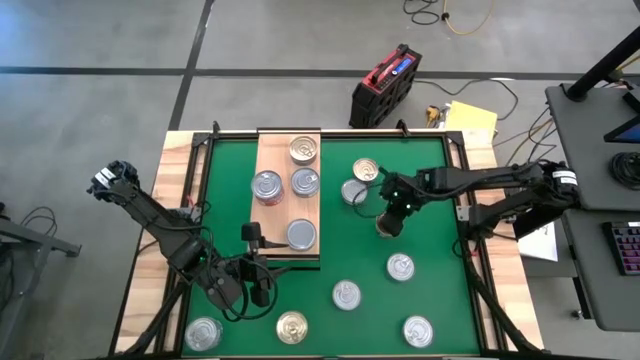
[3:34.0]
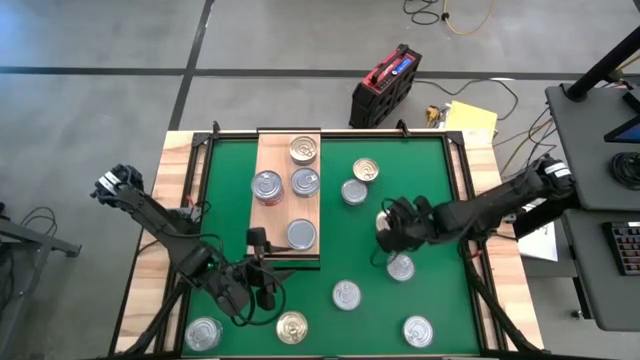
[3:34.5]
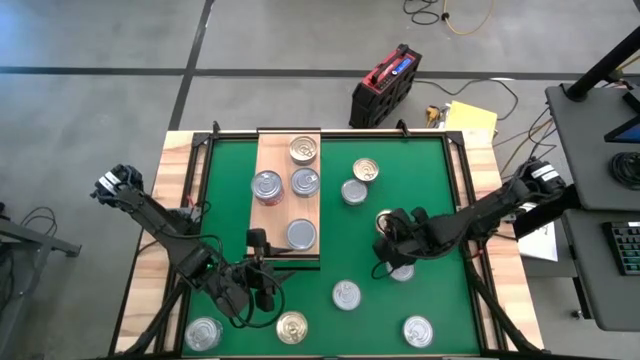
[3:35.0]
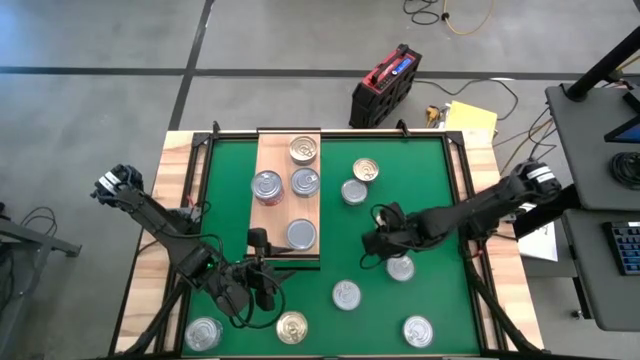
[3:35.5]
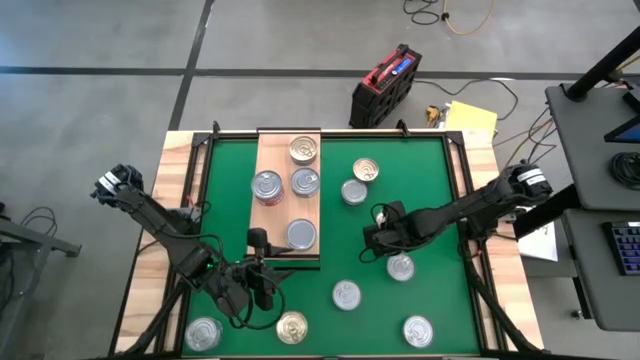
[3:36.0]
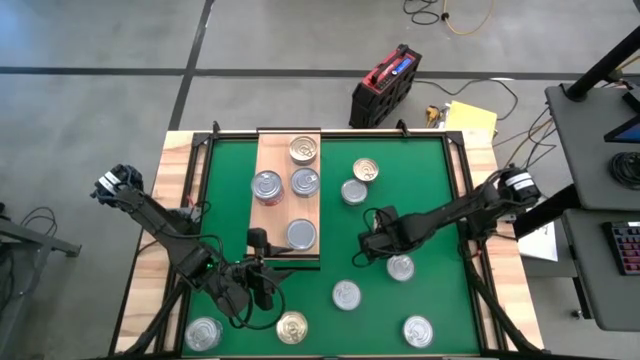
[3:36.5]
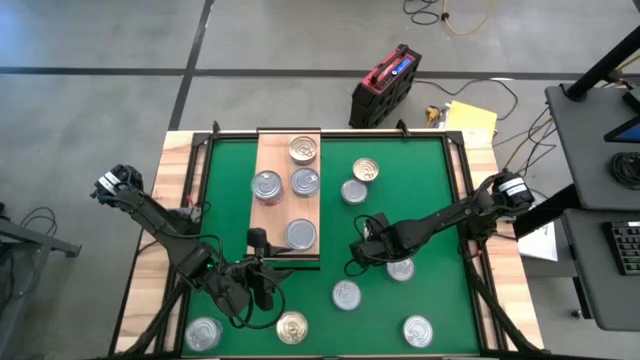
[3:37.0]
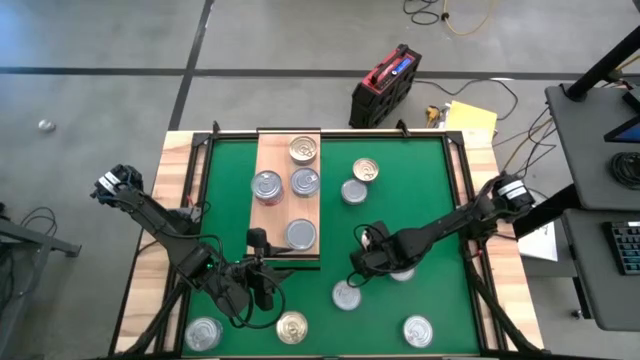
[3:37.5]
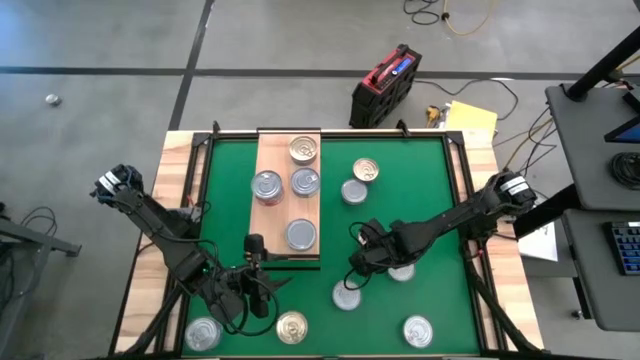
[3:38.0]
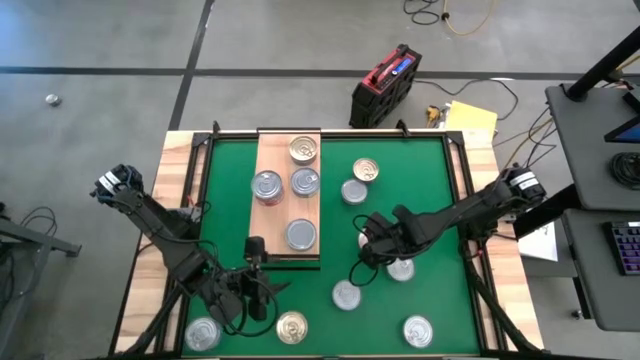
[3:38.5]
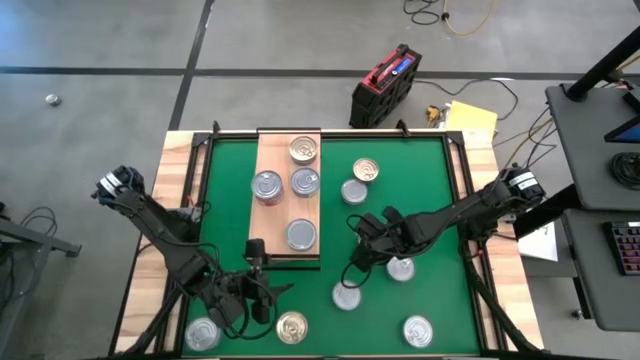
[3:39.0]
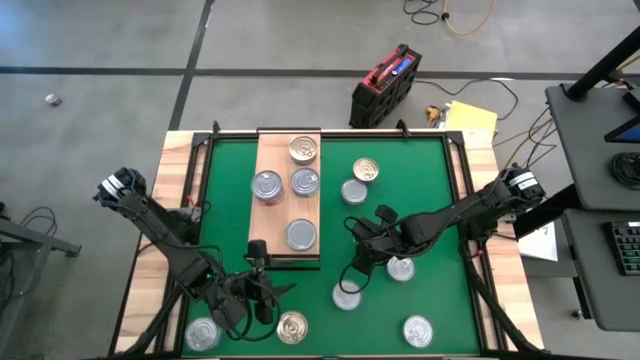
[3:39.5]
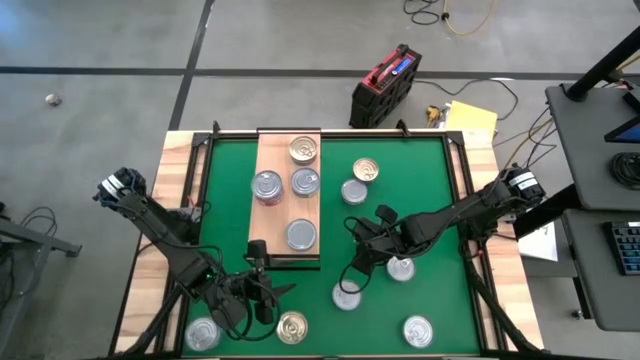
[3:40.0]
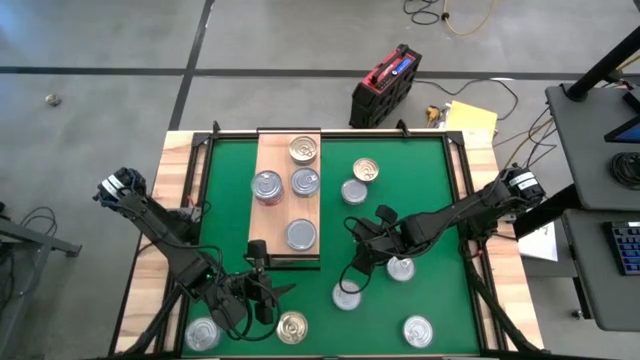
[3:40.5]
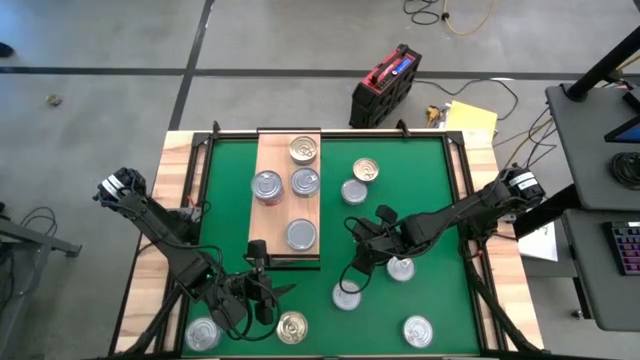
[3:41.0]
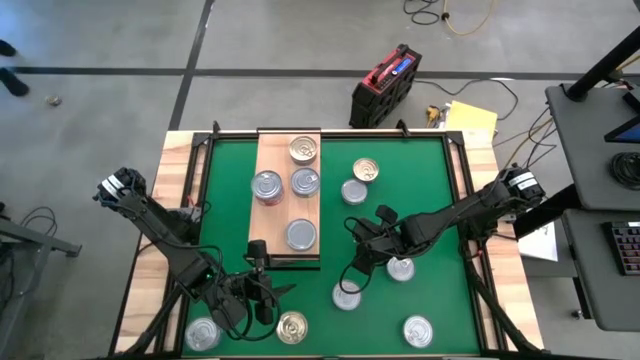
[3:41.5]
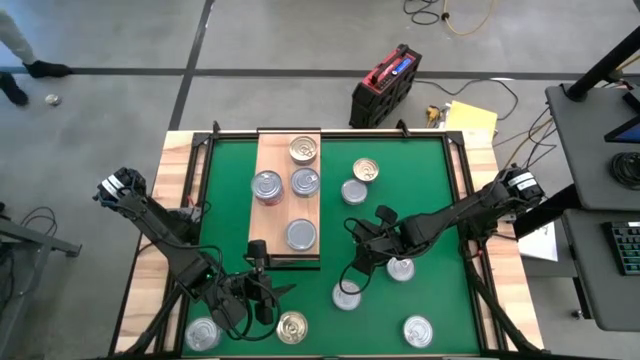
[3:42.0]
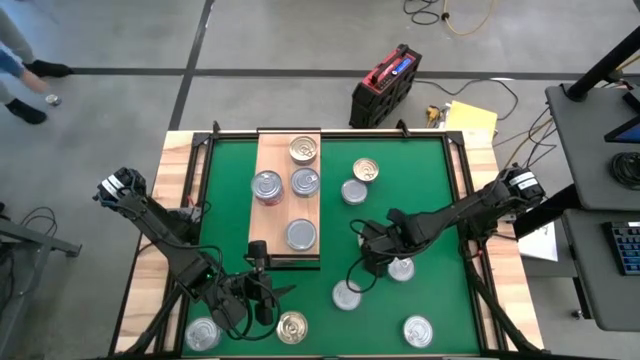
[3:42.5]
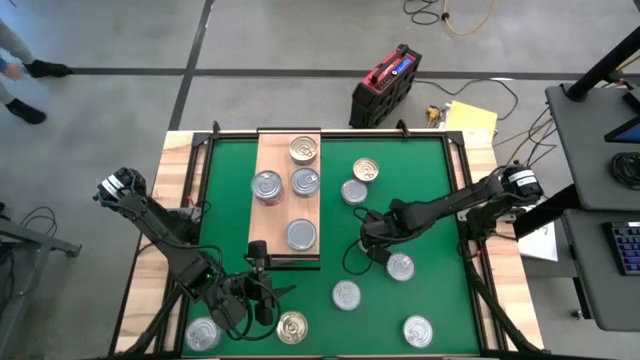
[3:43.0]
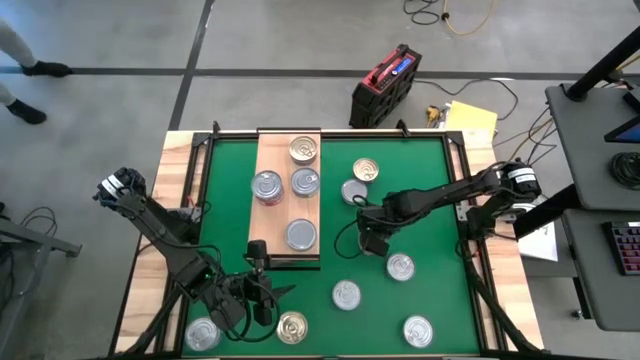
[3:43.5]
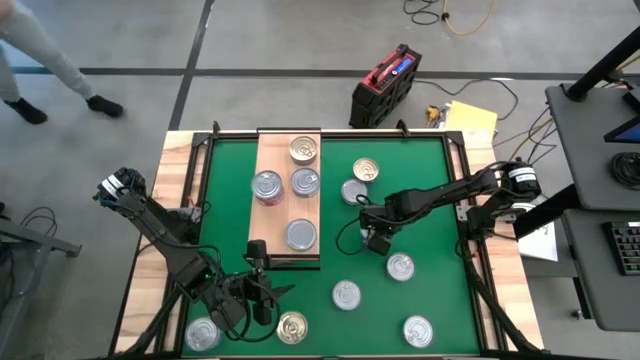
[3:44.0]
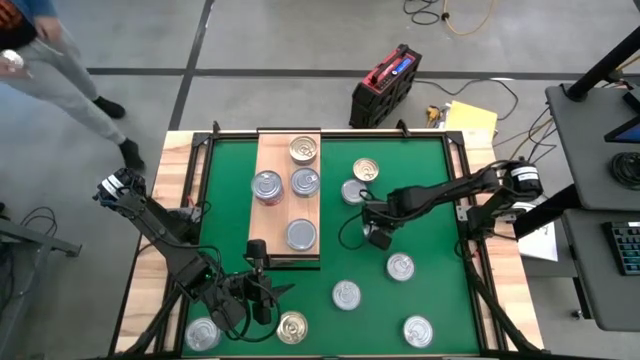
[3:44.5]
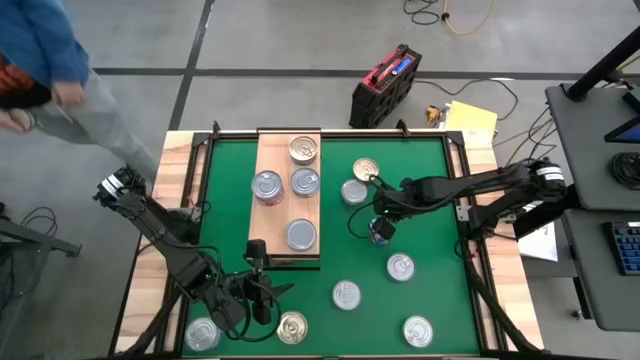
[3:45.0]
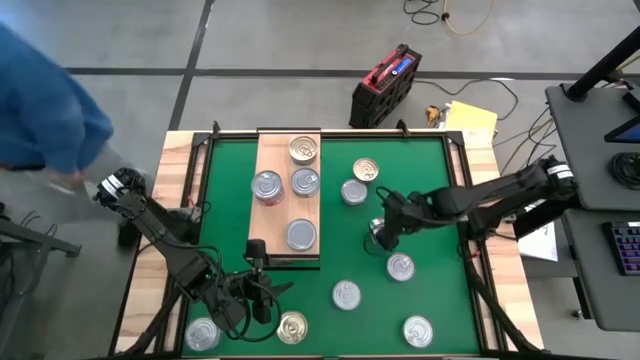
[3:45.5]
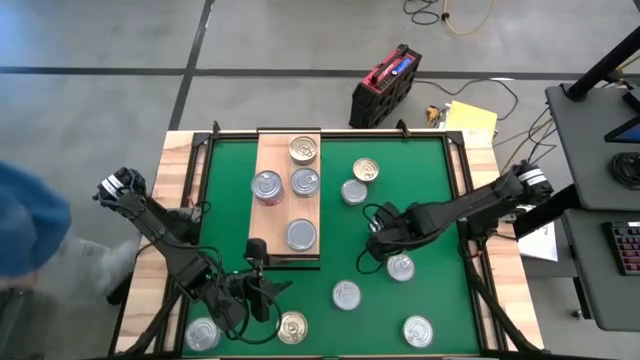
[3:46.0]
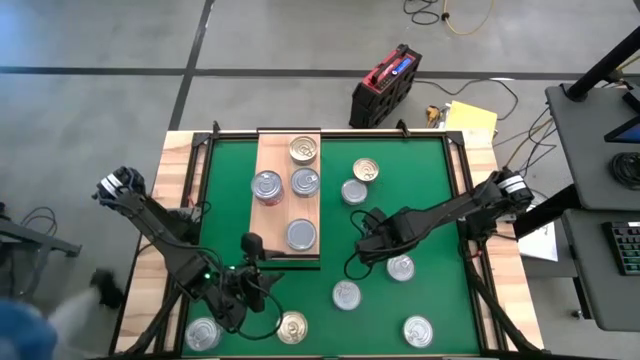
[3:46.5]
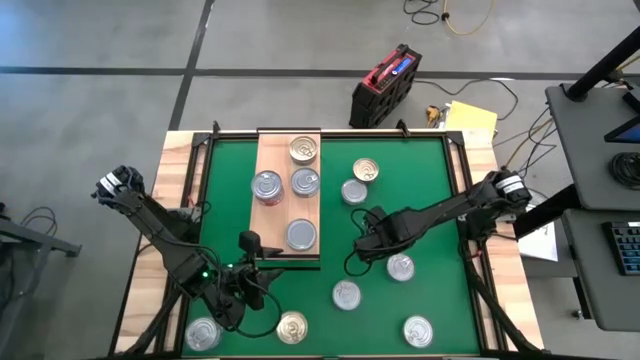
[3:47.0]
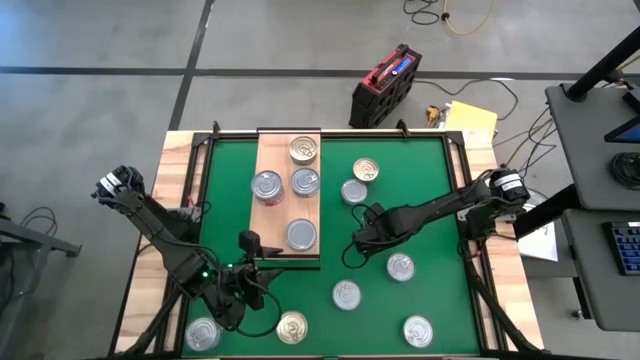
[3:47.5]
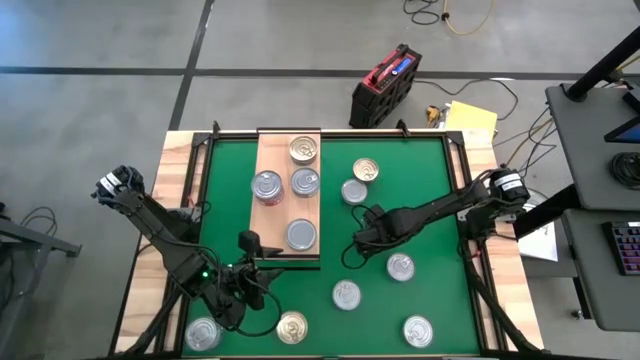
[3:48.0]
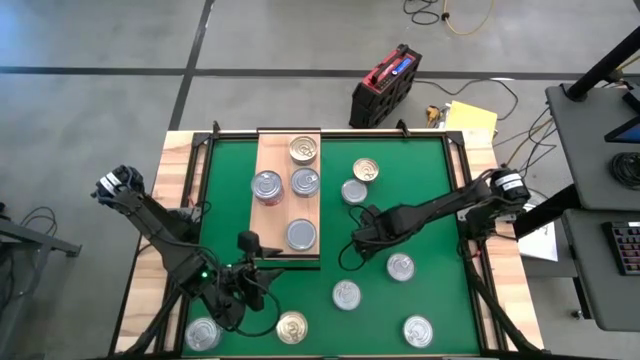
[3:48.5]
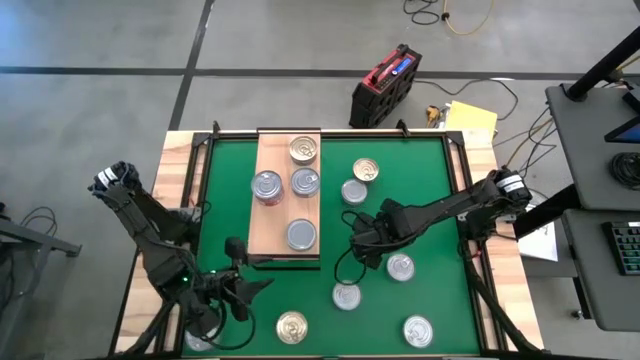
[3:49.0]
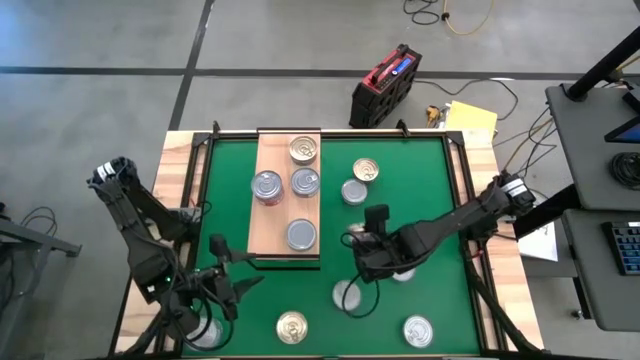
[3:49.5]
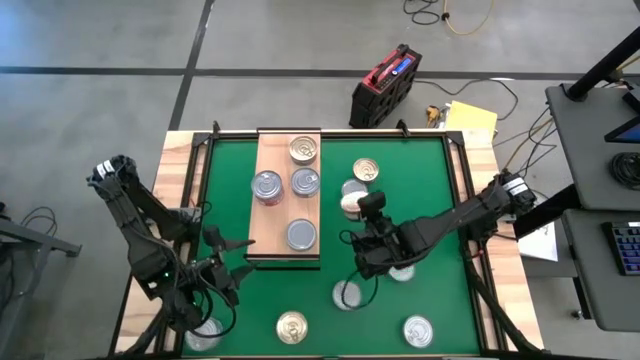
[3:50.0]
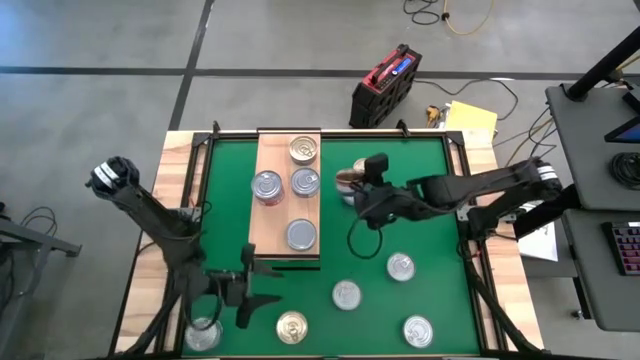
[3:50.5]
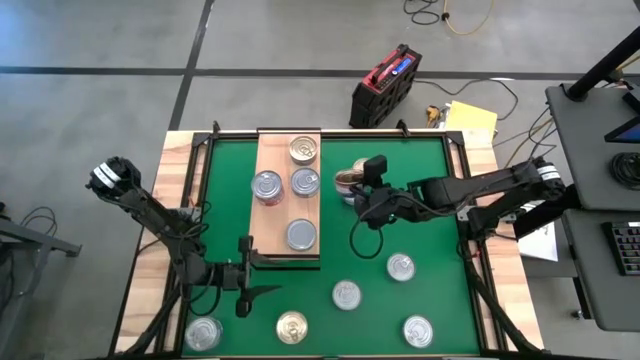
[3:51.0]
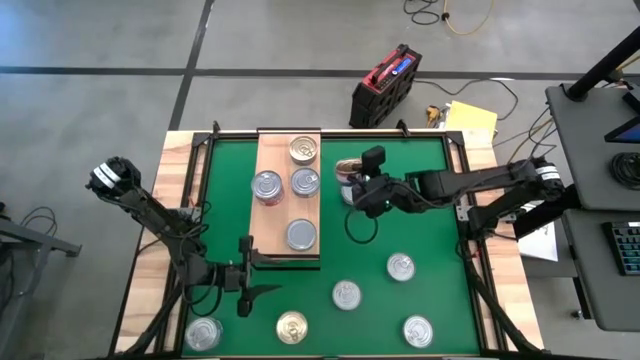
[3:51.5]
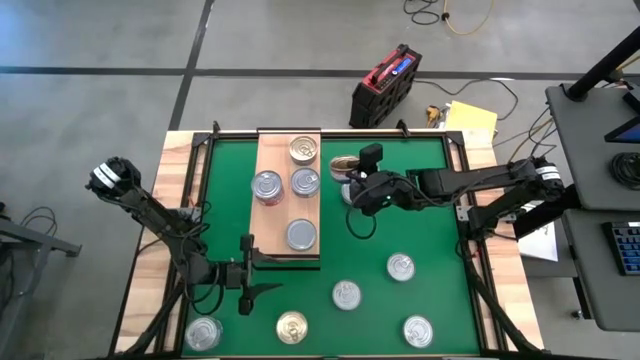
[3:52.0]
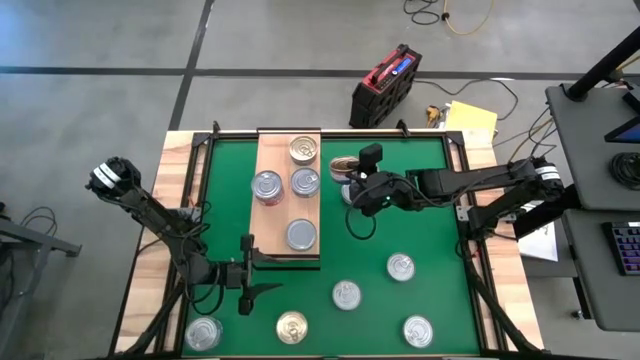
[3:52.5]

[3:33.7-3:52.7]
Task: Stack canned seafood by type on shelf
Stack the blue and pink tuna can on top of the blue tuna can on the shelf

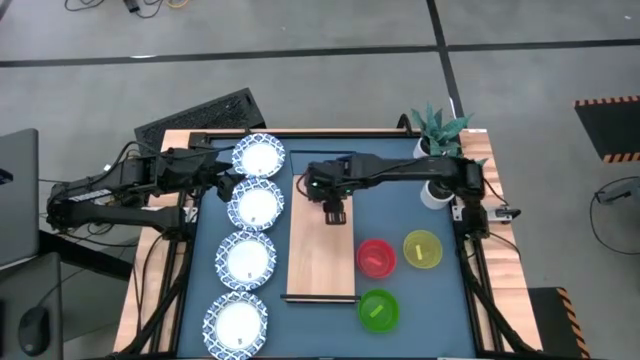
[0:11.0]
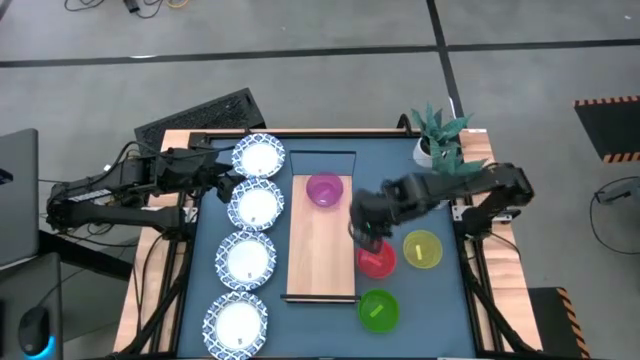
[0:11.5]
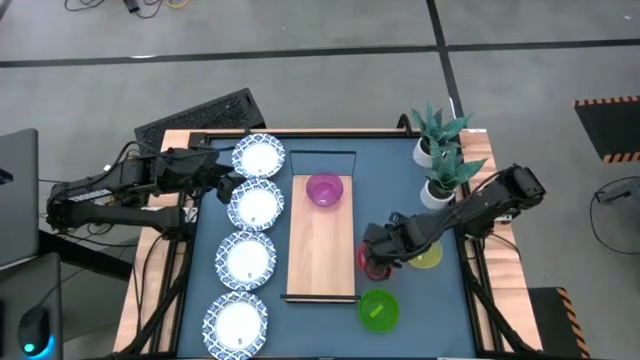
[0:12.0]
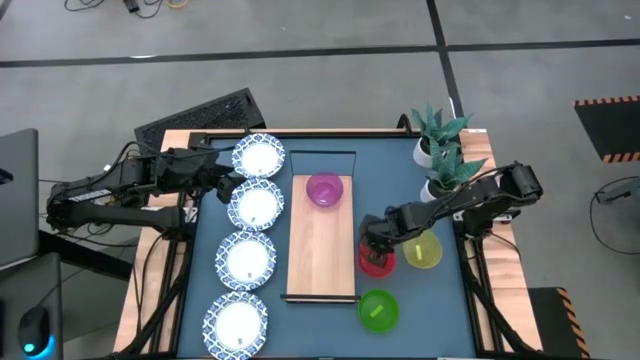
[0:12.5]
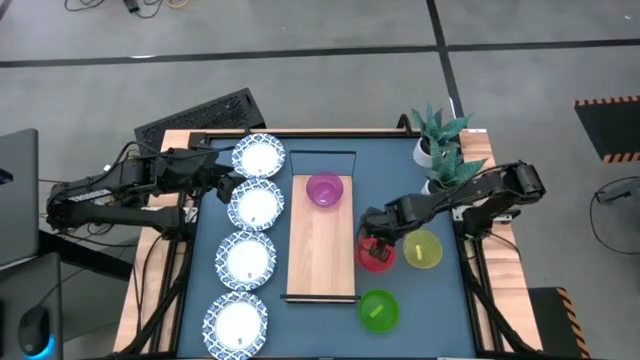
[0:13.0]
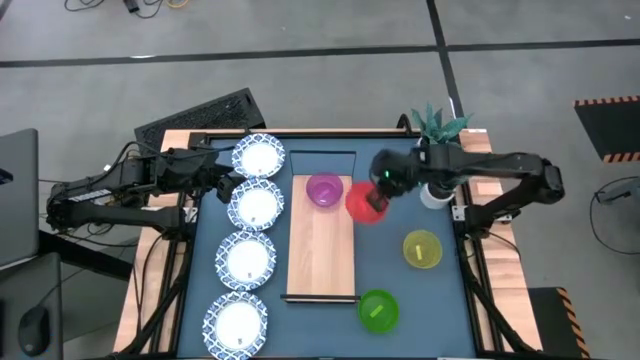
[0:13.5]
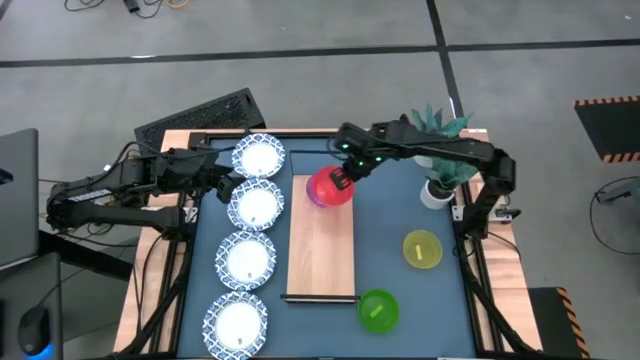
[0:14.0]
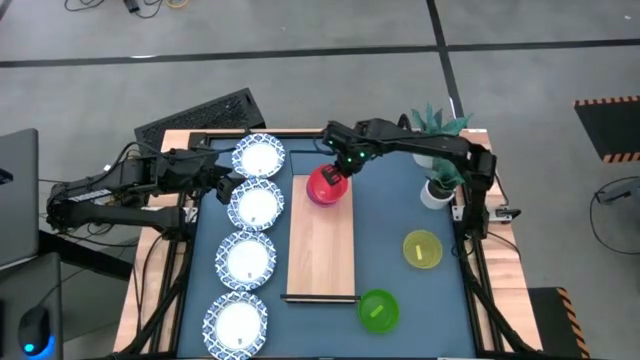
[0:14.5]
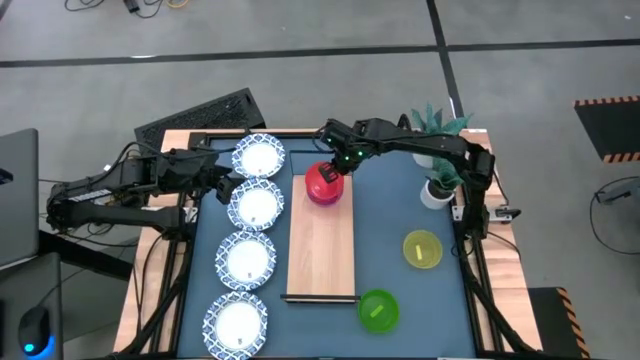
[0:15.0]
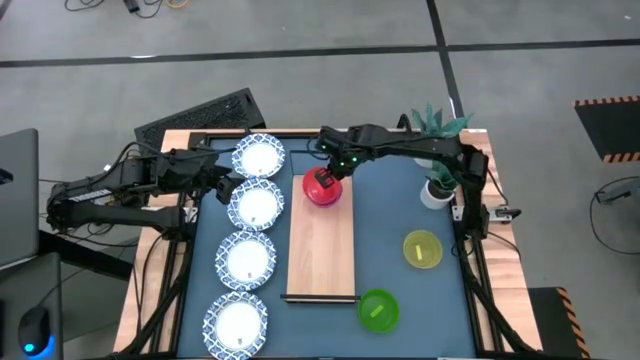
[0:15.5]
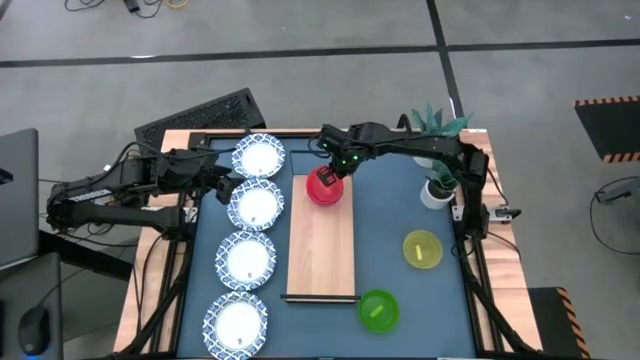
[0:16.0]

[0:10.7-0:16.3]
Task: Place and stack bowls onto a shelf
Stack the orange bowl on top of the purple bowl on the shelf
